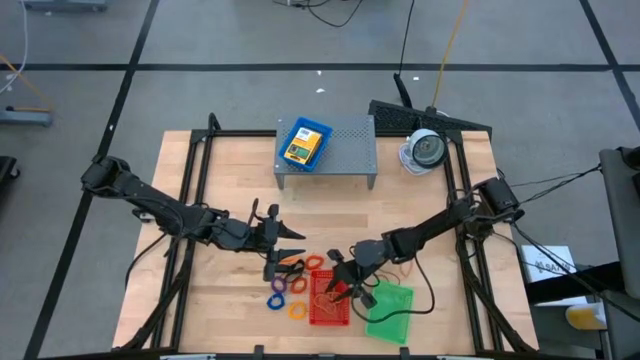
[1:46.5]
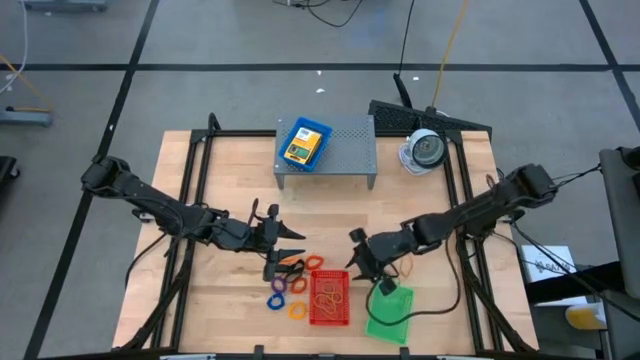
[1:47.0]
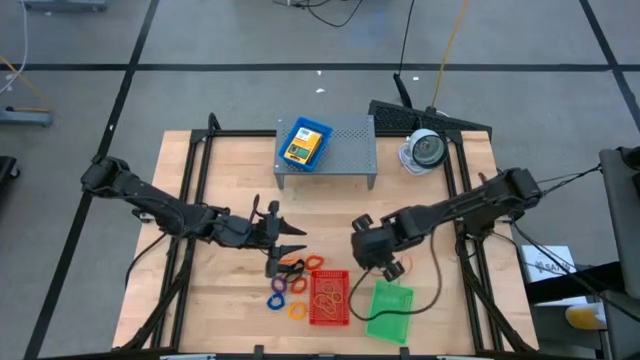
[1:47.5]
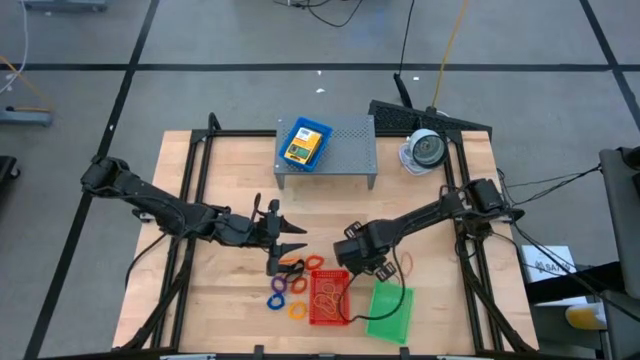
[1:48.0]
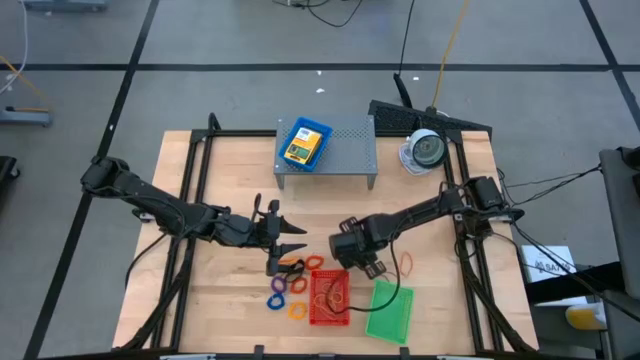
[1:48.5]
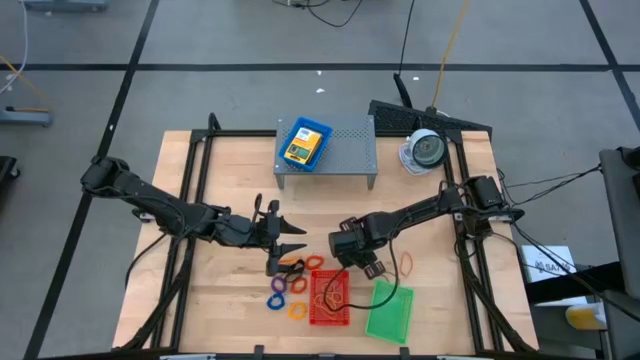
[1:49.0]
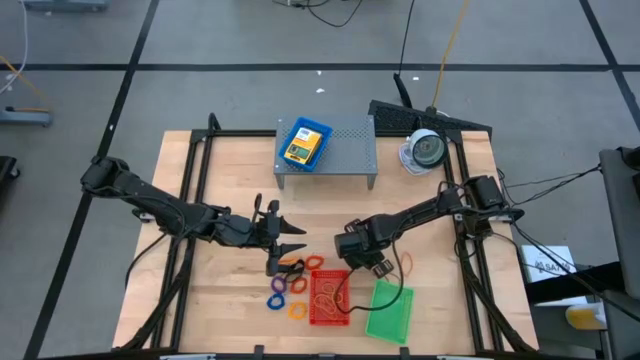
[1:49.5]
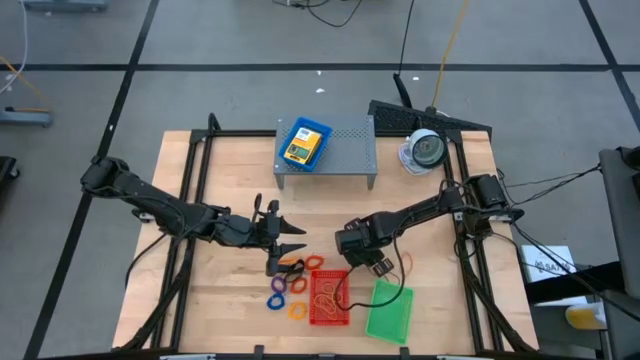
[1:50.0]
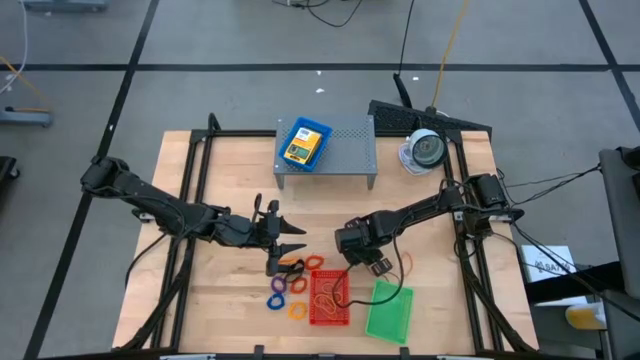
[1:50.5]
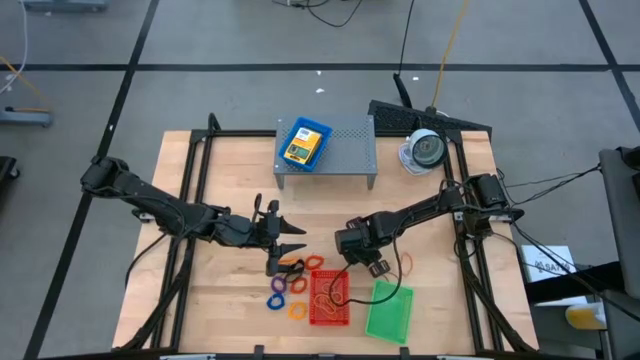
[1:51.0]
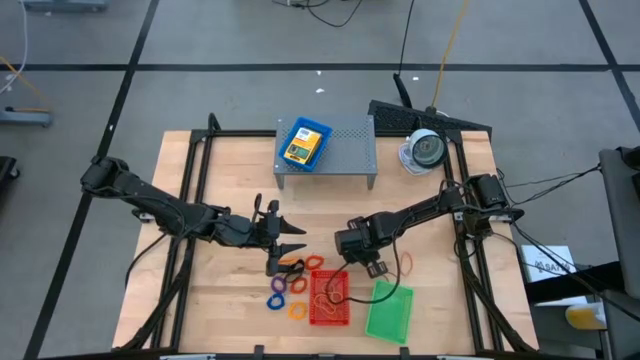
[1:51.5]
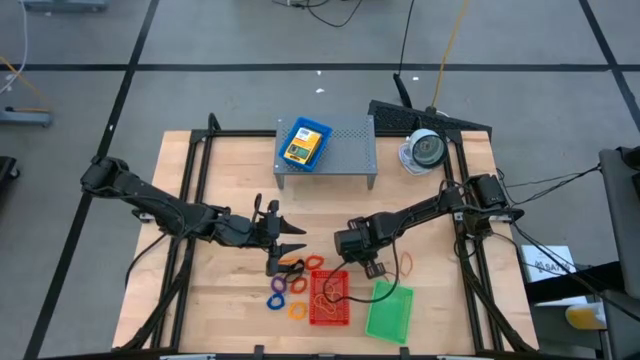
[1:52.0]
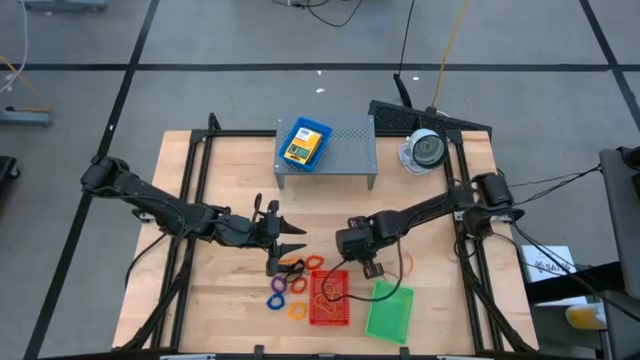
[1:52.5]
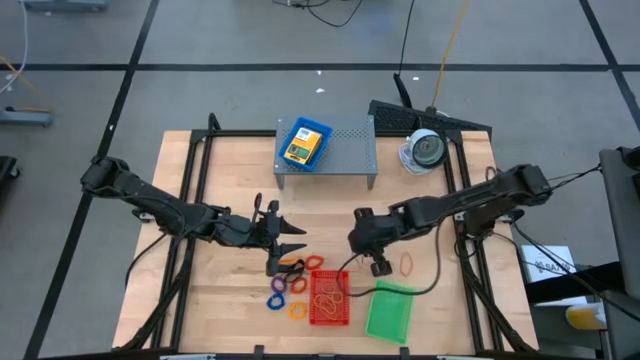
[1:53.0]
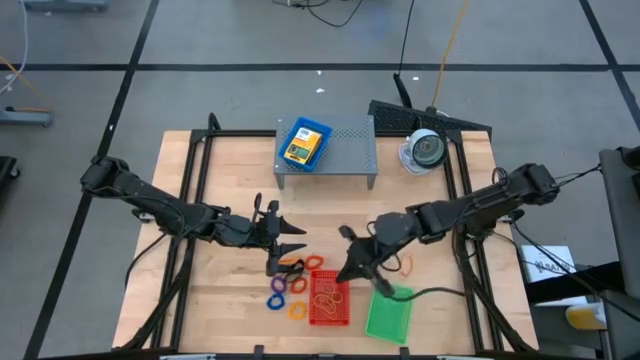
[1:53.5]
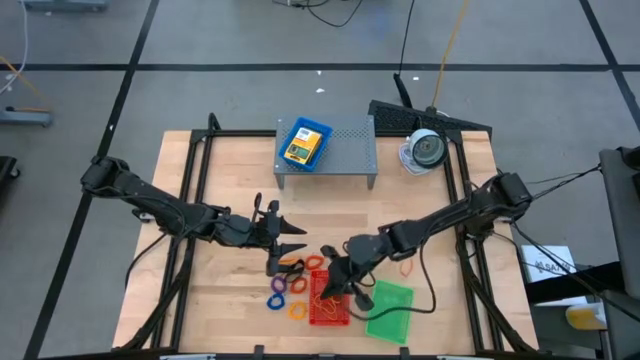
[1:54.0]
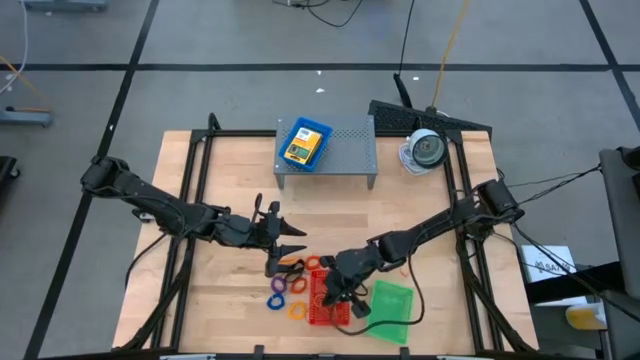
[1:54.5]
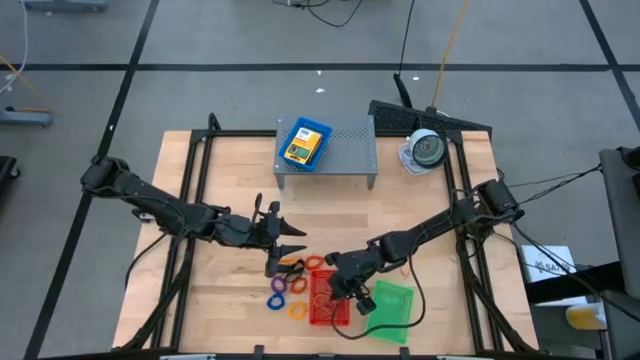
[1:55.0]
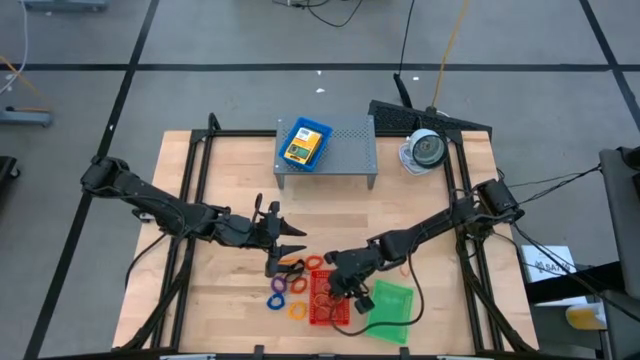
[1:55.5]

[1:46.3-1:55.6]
Task: Pick & Place Office Desk Supplies
Put the red rubber band into the red bin

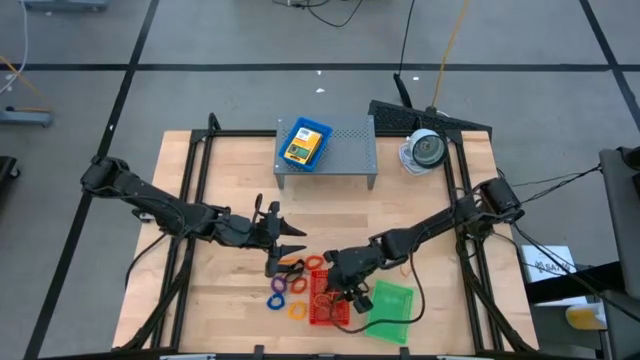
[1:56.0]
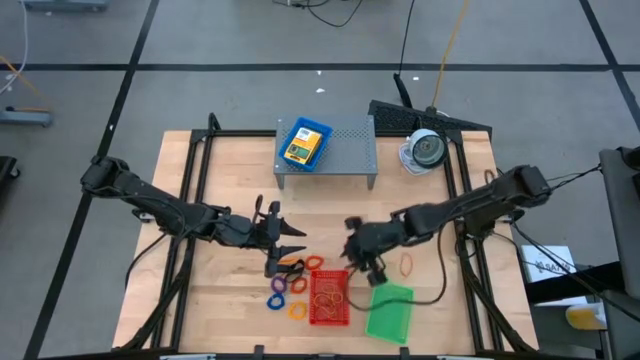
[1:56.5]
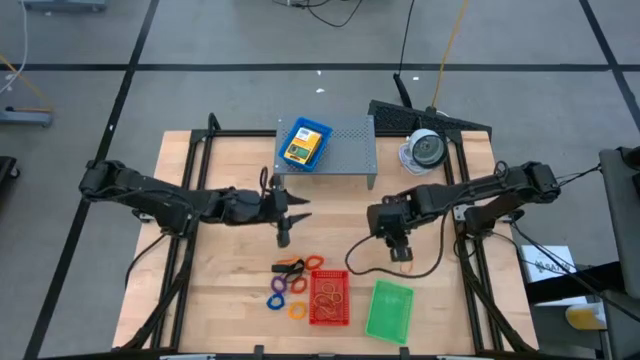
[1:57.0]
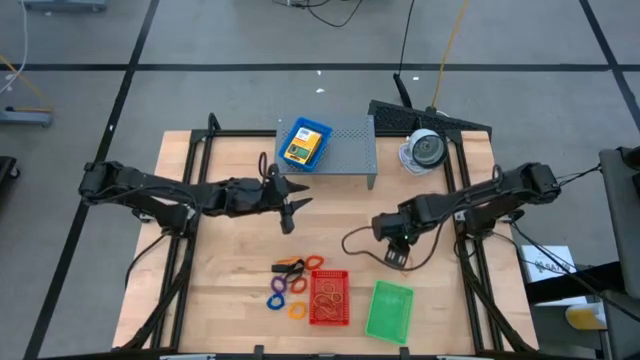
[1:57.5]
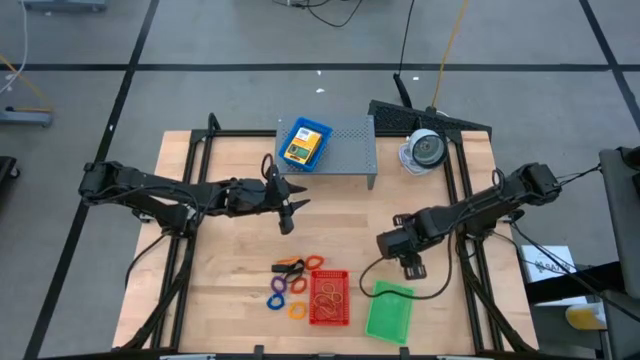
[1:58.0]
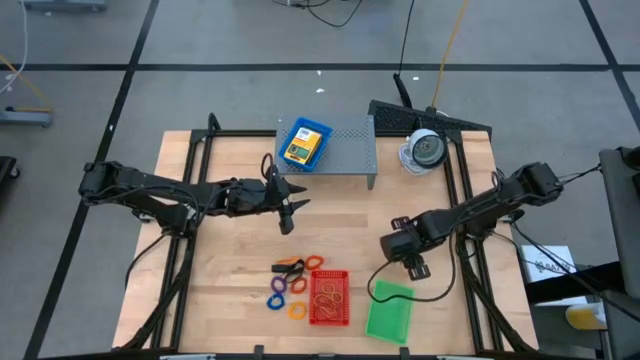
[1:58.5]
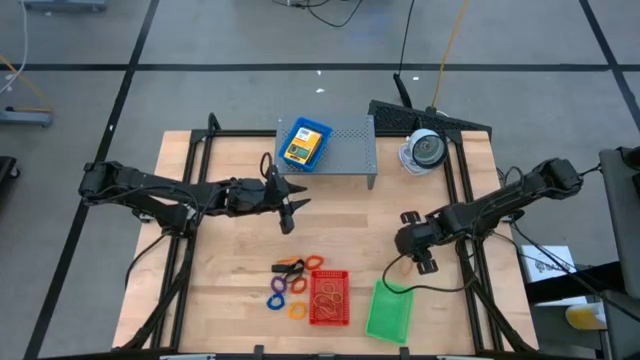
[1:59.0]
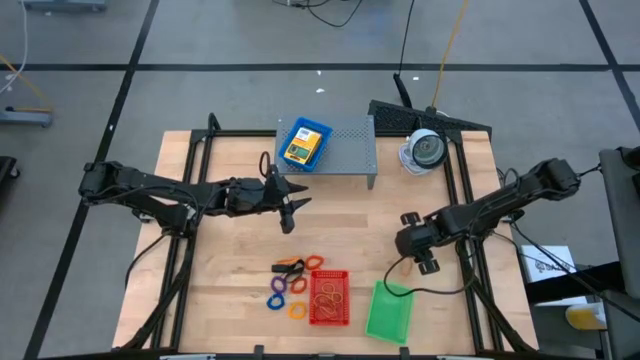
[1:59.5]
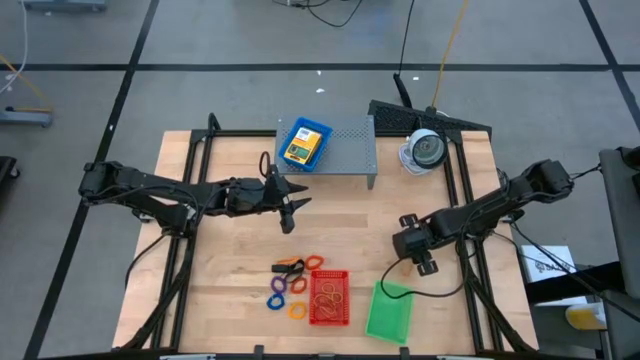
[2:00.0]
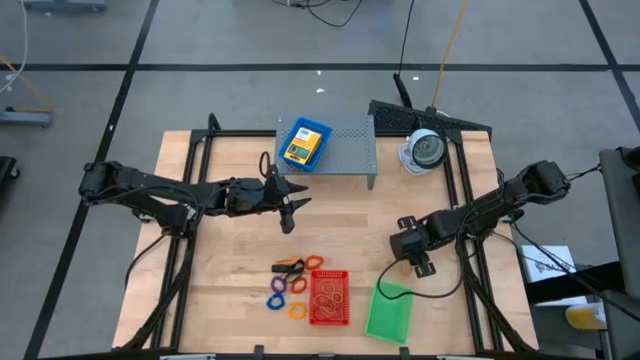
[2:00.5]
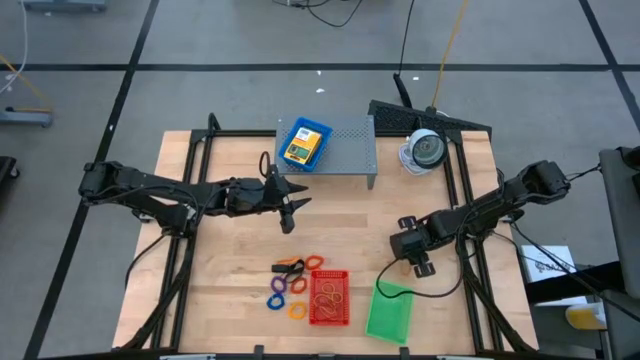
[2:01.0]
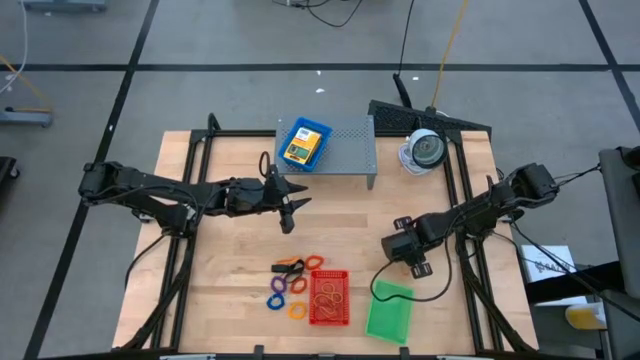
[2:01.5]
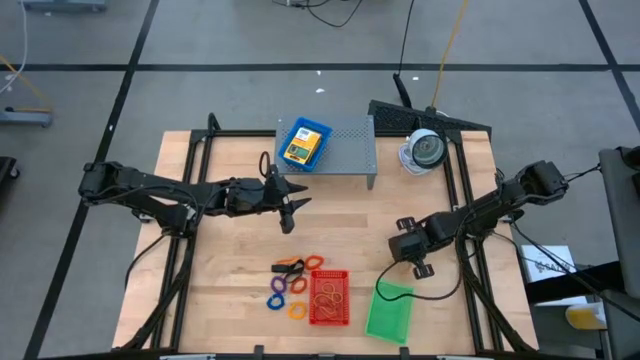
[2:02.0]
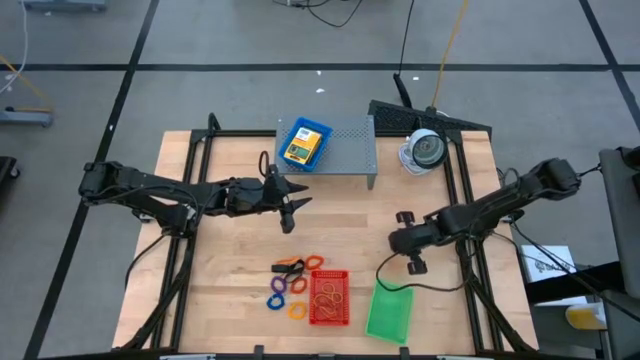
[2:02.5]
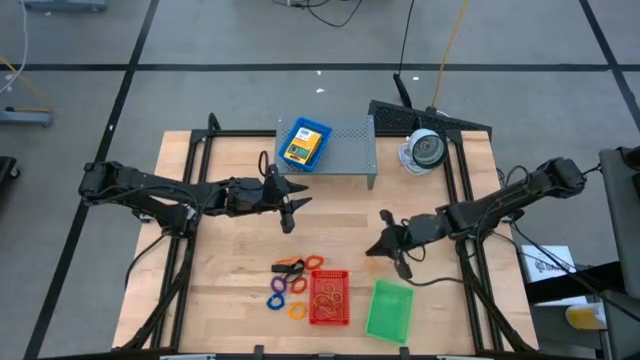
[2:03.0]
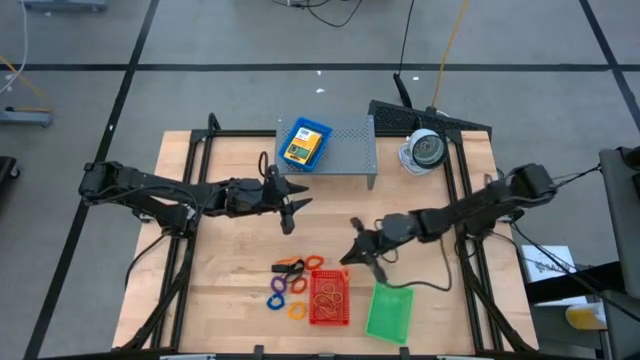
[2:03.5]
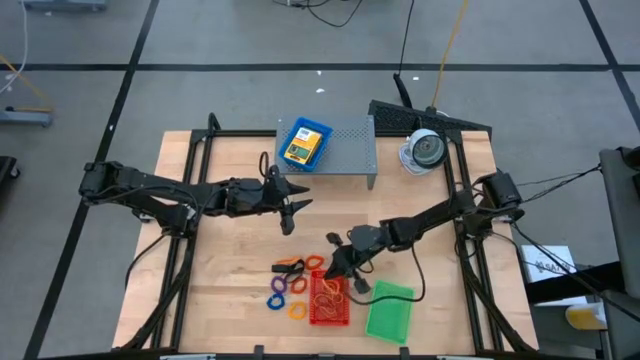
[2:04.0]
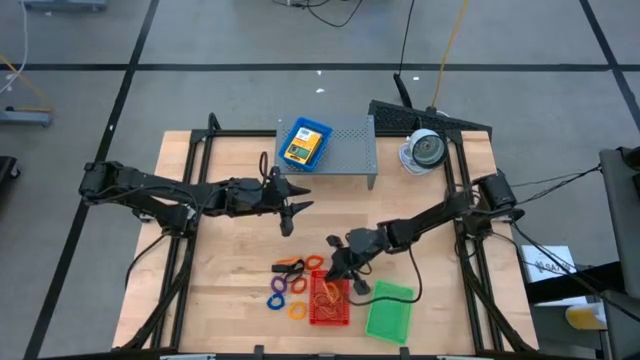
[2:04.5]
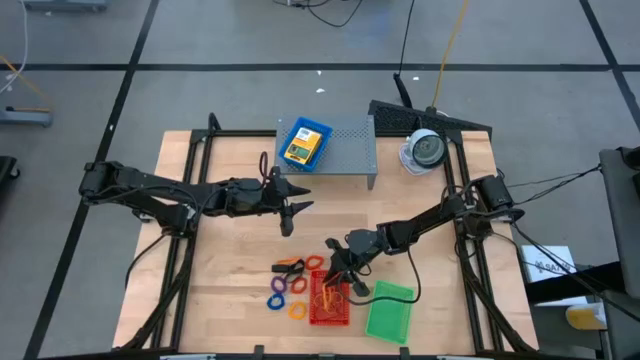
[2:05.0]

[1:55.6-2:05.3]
Put the orange rubber band into the red bin

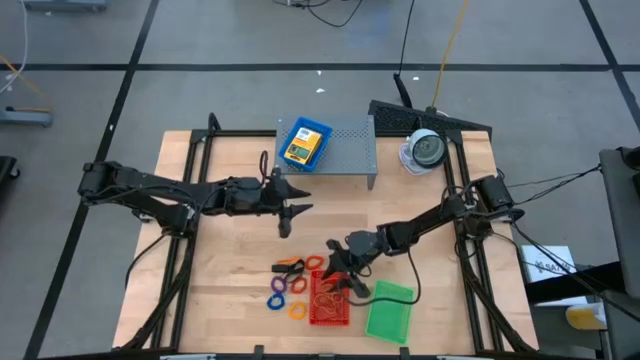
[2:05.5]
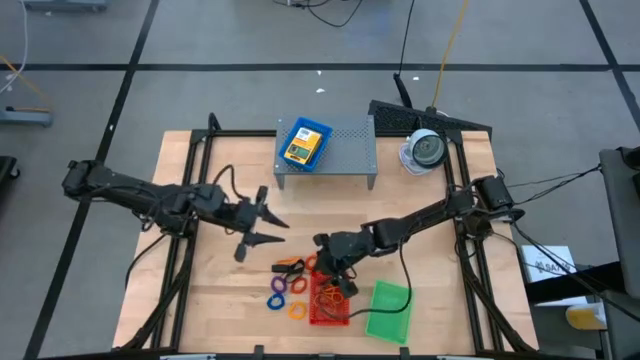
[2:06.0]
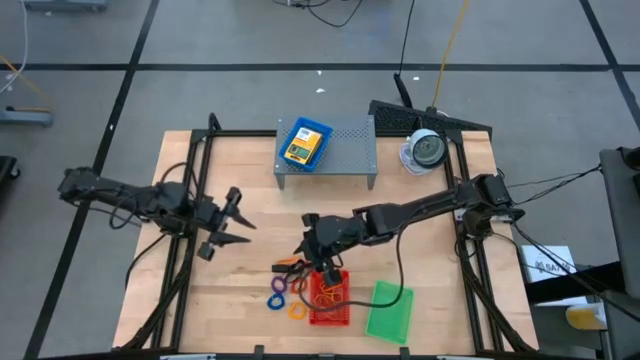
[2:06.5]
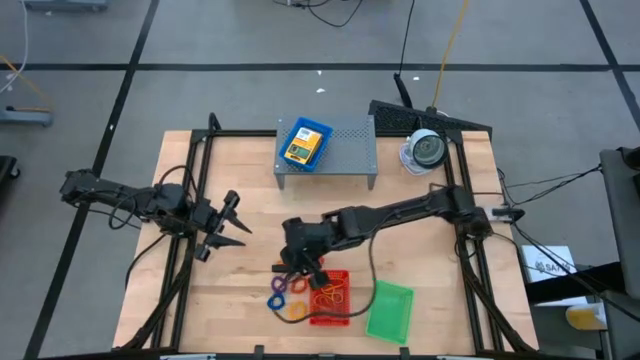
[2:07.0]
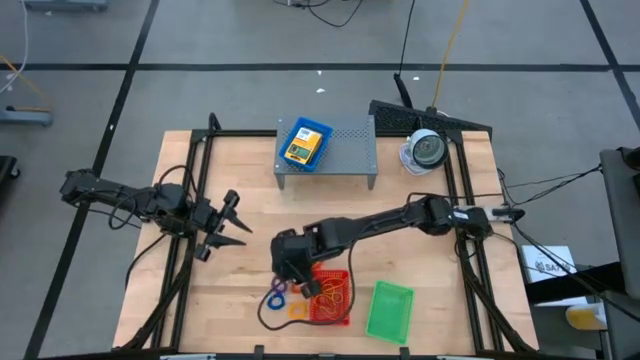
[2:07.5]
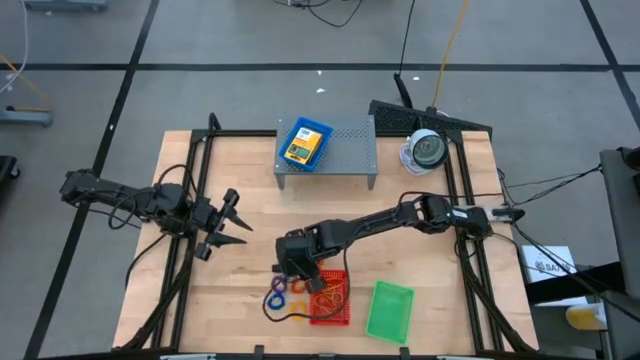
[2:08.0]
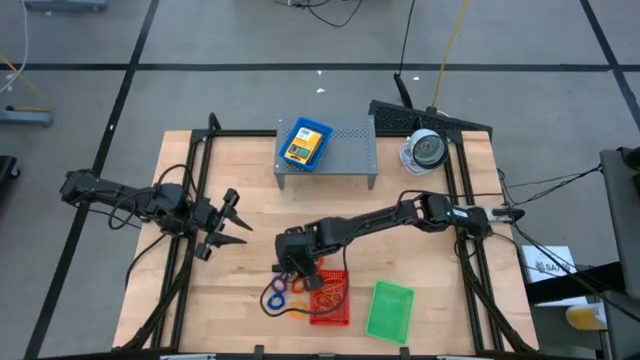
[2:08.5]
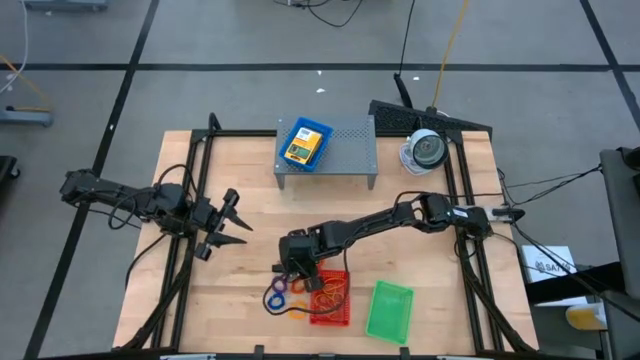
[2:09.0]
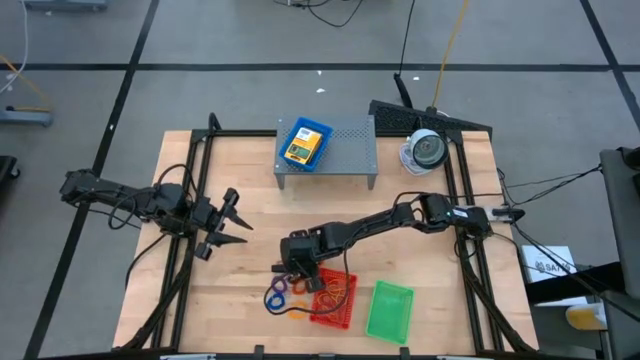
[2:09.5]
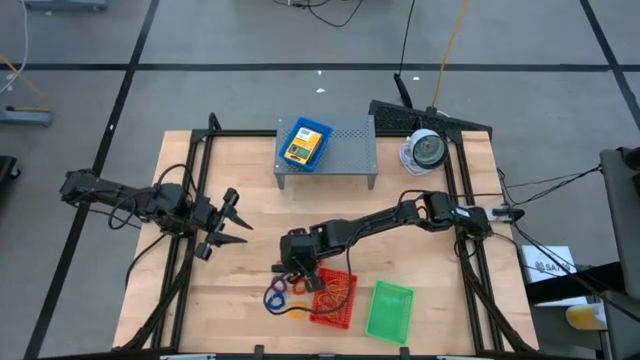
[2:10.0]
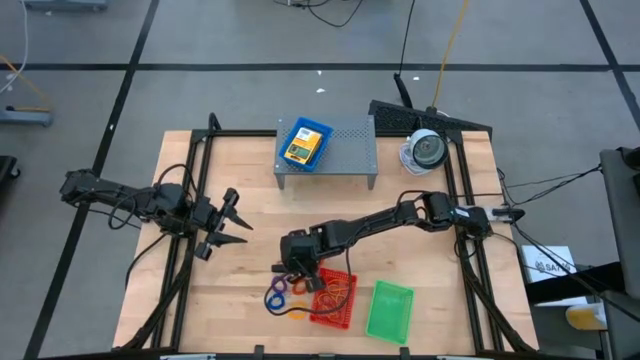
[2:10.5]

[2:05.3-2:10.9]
Put the black rubber band into the red bin
